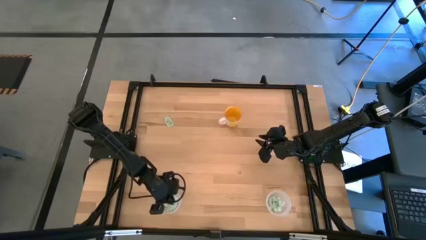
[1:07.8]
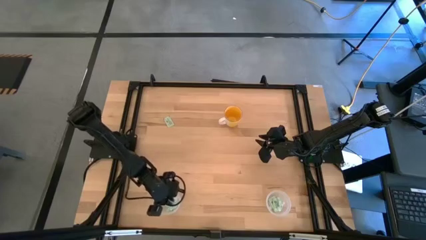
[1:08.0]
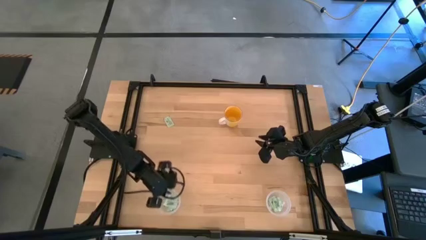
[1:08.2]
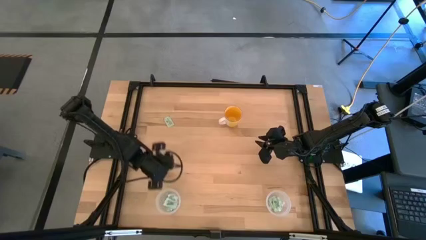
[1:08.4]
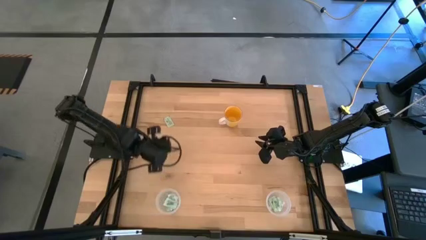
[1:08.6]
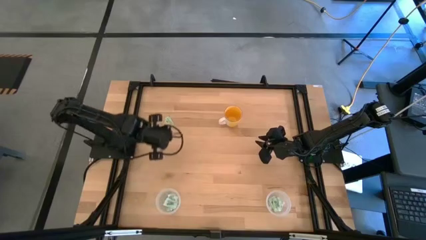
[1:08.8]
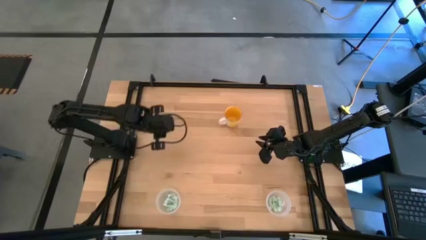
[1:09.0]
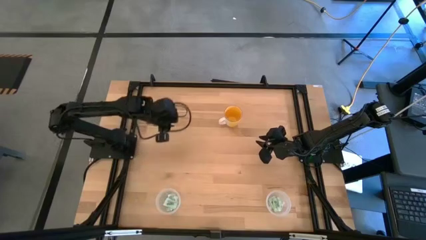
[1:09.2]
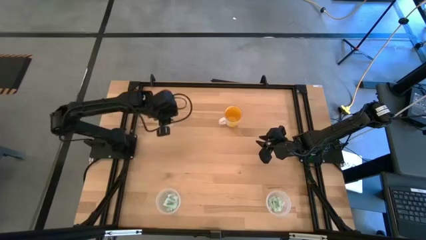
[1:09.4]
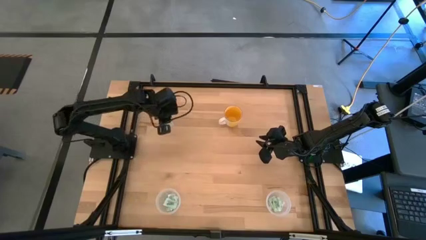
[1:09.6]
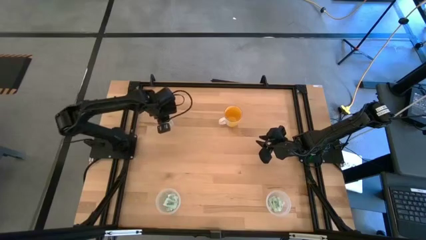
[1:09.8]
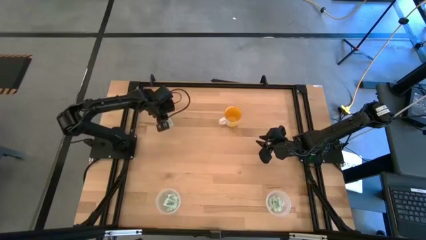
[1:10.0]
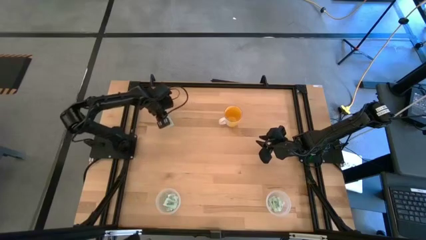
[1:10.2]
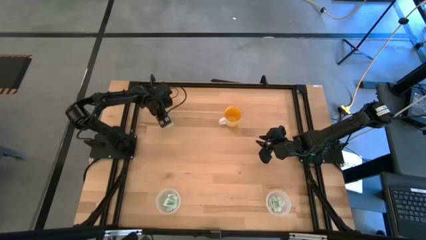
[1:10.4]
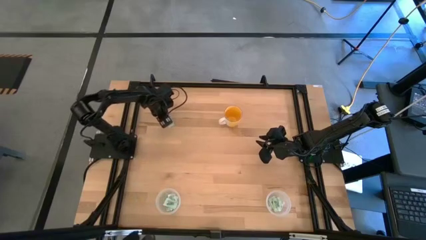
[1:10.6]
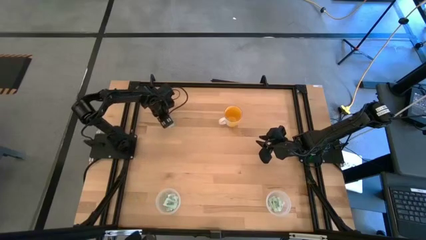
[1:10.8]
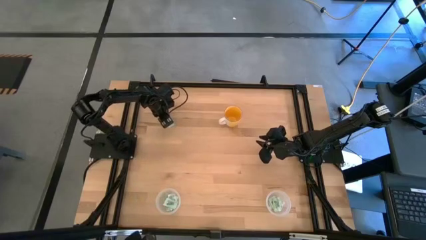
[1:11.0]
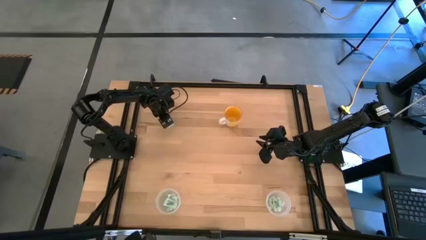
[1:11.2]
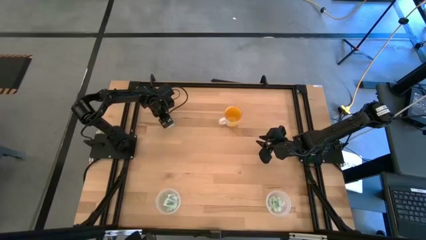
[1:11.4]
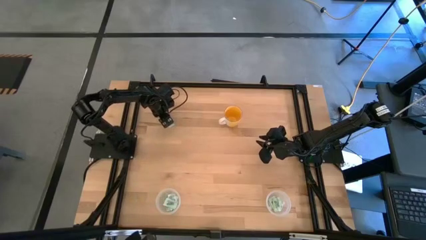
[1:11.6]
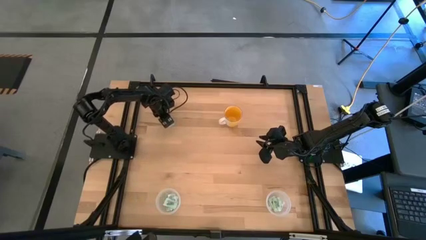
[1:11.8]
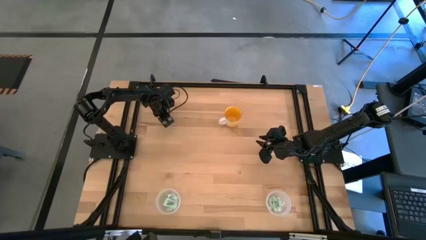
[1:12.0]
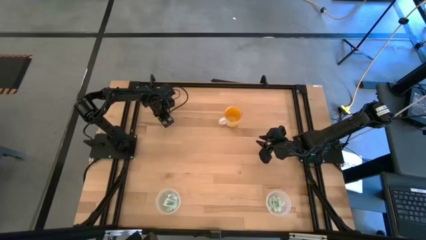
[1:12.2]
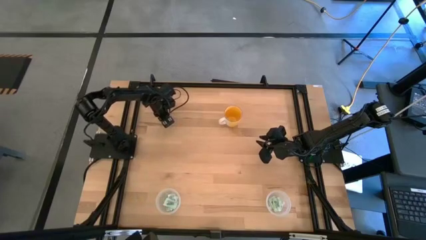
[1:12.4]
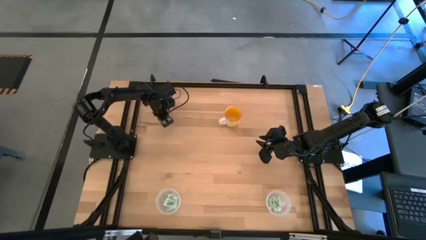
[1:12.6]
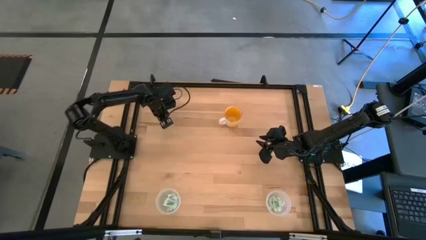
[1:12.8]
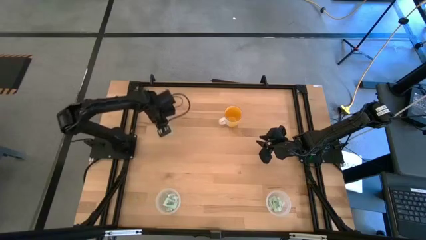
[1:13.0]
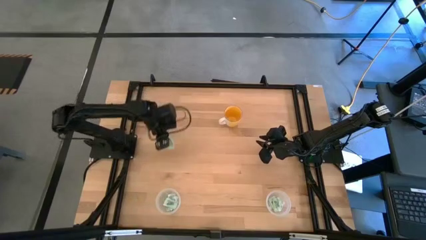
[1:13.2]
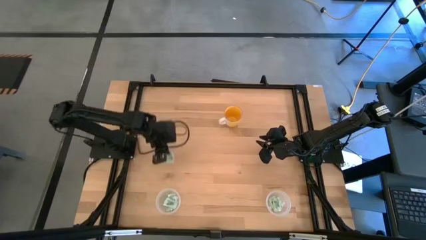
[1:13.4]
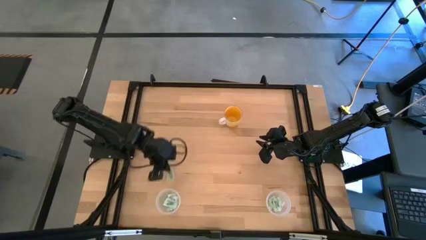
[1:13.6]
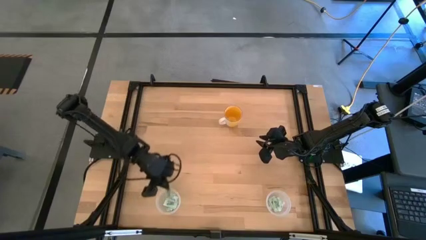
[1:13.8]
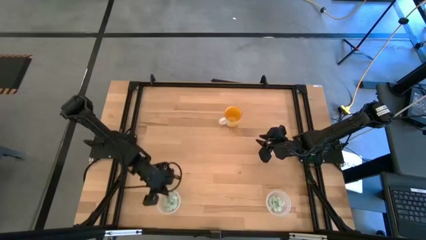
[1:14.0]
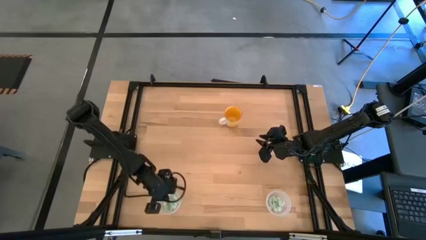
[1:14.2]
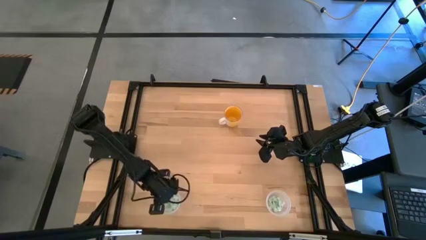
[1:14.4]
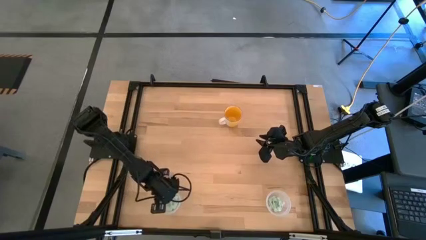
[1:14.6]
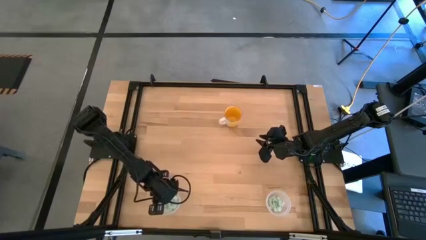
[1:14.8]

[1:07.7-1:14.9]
Task: Pick and place items into bin
Put the stevia packet into the left transparent bin

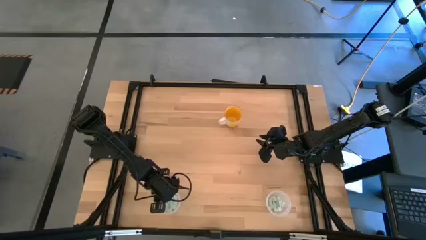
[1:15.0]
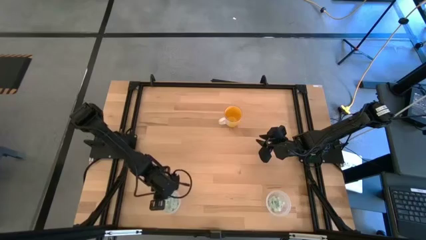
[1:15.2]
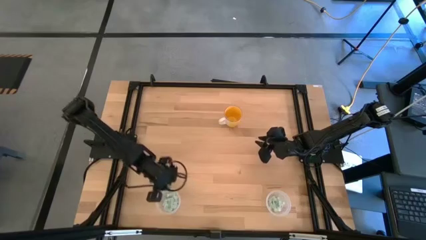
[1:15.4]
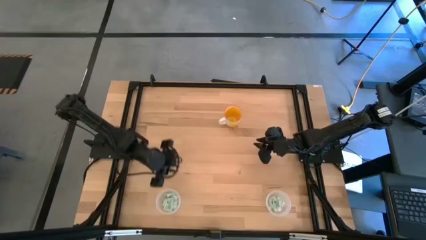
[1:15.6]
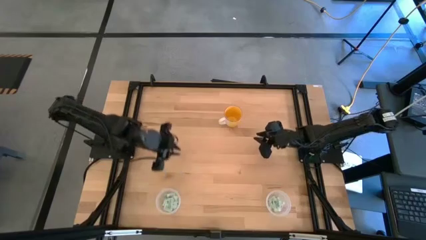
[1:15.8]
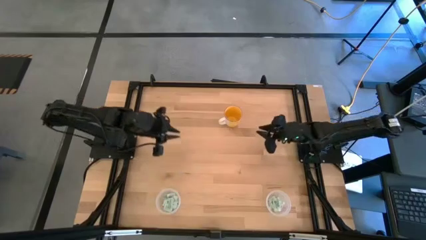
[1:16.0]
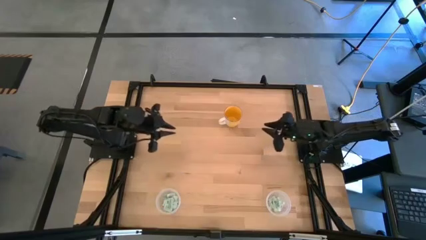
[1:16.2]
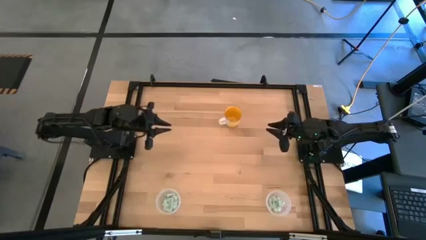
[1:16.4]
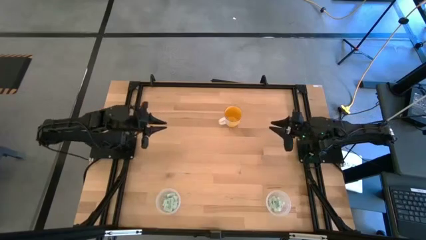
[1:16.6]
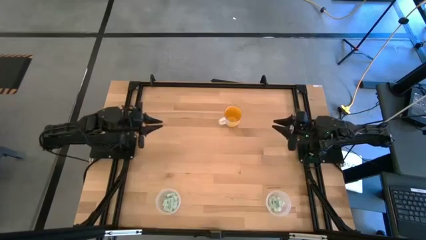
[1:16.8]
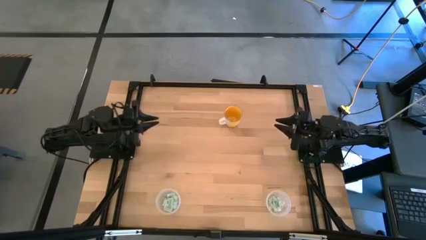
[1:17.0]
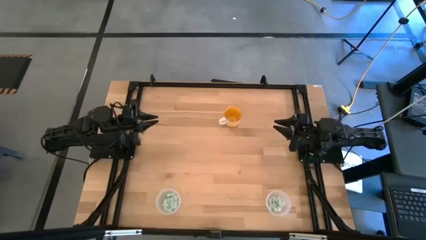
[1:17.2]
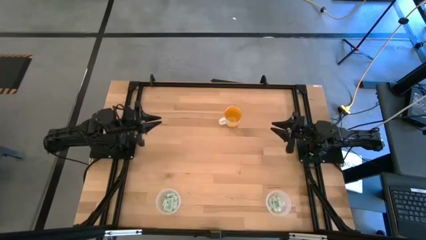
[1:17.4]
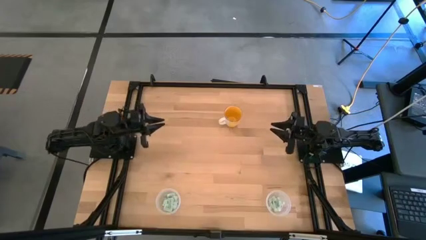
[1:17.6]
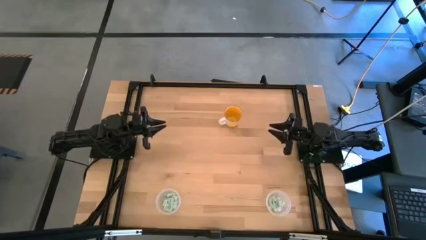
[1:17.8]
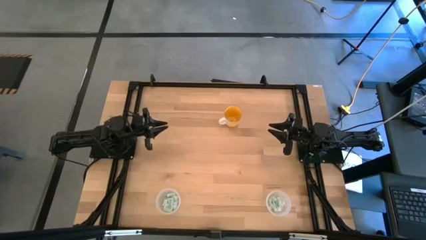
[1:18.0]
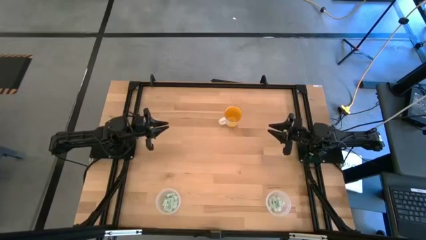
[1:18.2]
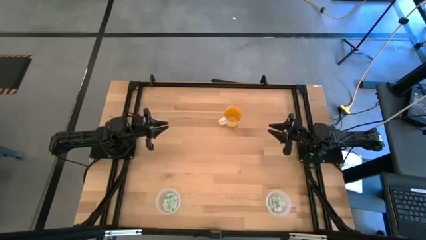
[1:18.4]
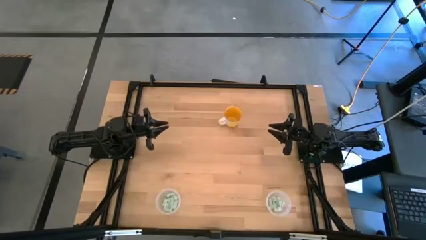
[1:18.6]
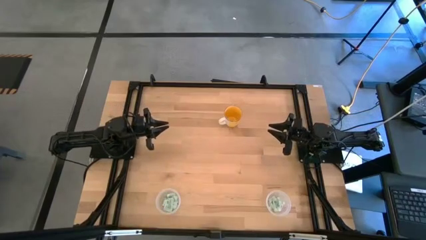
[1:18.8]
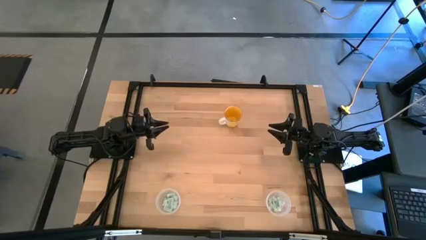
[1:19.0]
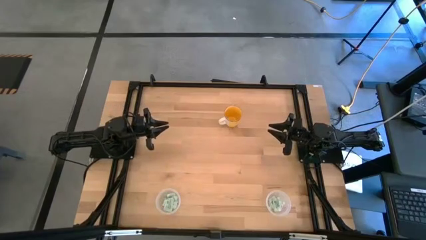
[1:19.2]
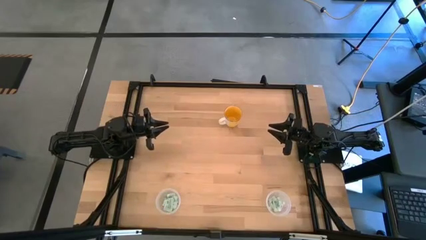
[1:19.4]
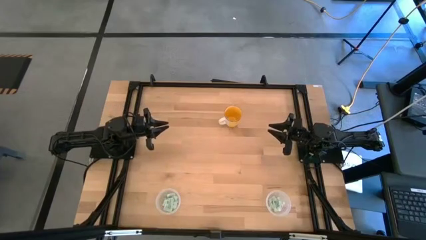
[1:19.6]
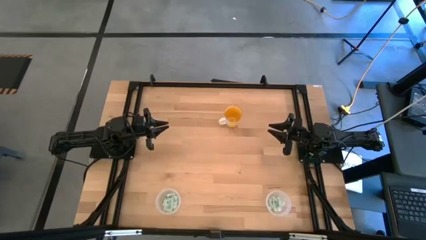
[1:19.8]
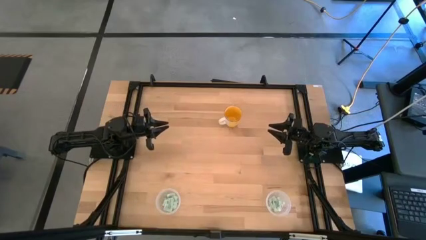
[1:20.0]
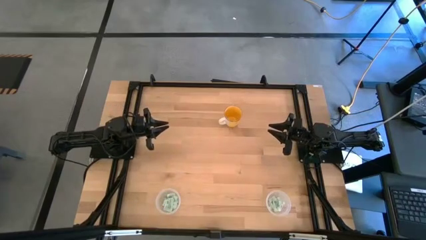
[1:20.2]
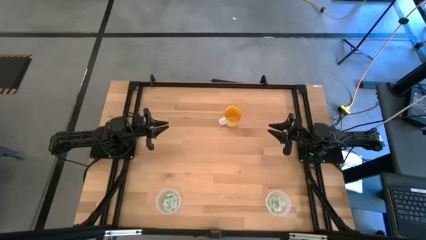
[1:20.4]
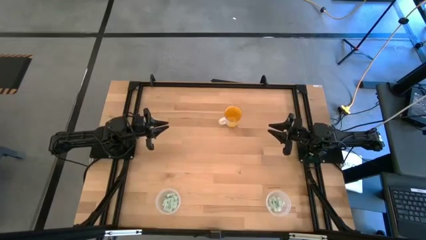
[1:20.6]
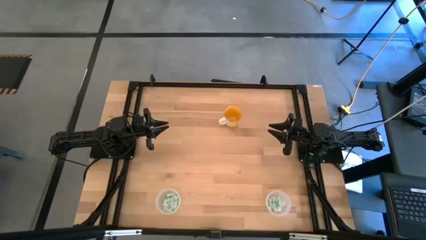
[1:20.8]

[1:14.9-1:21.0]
Return to Home Position

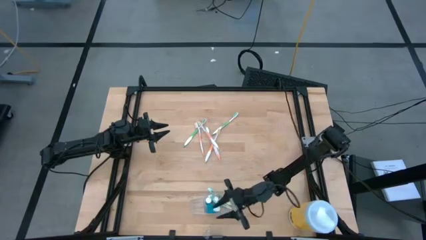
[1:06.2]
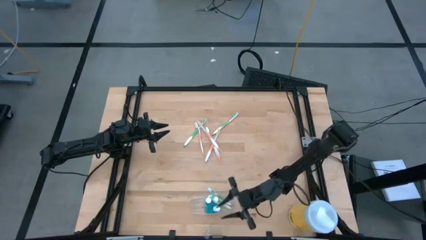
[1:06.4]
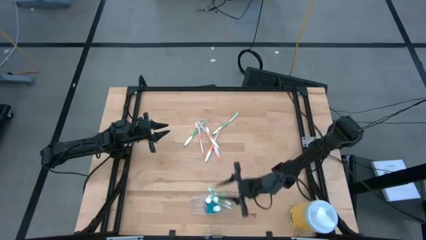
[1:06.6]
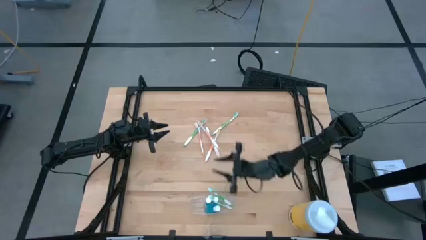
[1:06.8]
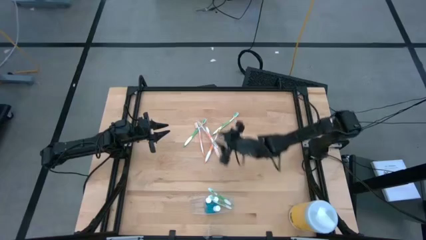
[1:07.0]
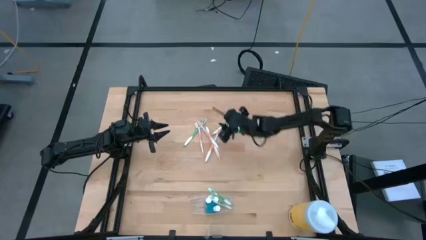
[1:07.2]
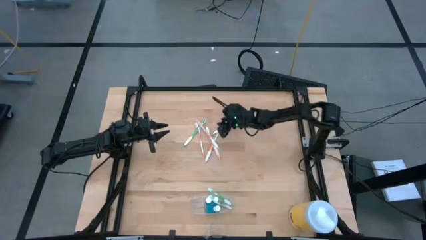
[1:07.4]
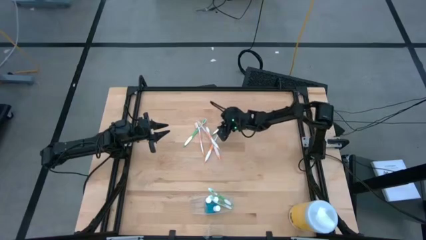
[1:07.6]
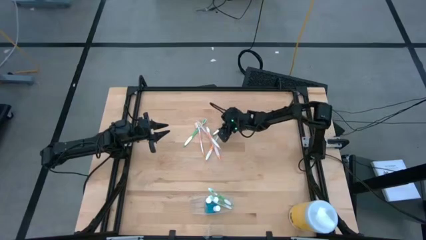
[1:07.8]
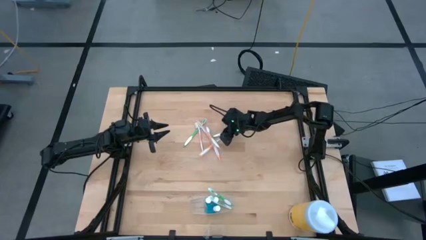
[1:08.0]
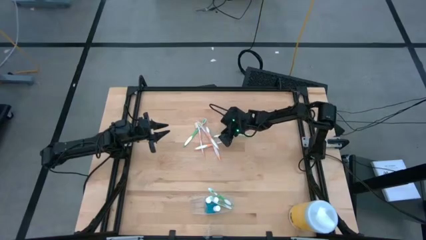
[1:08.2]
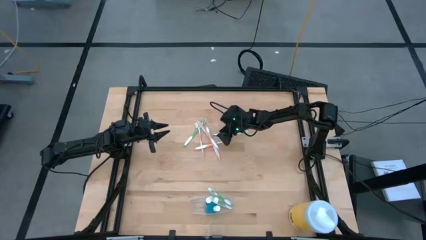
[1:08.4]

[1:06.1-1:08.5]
Task: Pick & Place toothbrushing station
Put the green toothbrush into the transparent organizer
